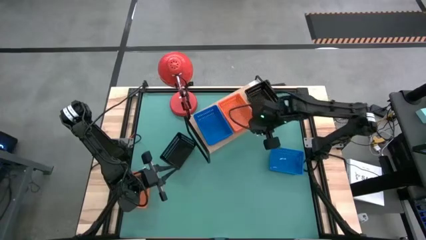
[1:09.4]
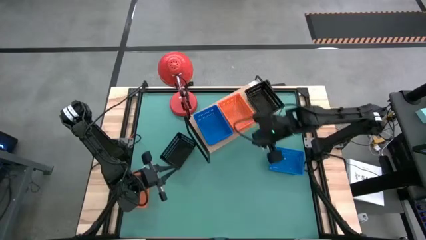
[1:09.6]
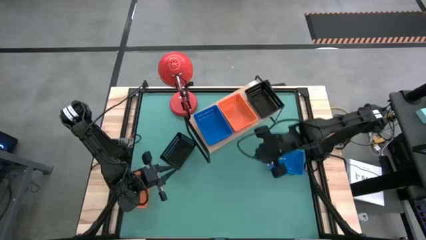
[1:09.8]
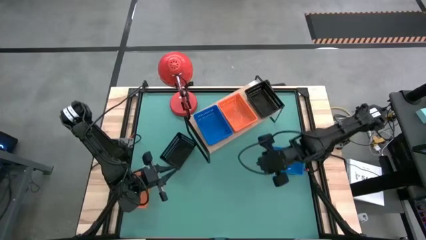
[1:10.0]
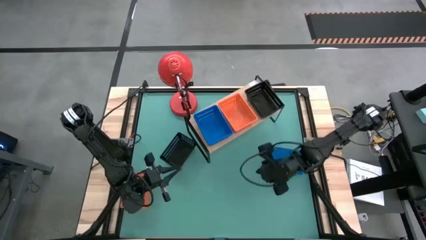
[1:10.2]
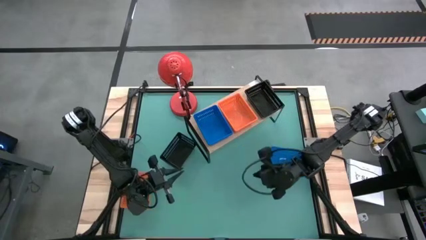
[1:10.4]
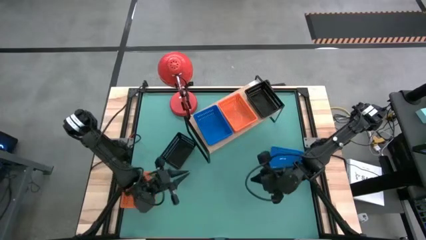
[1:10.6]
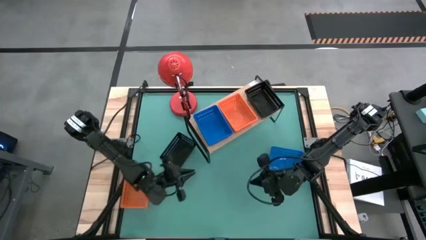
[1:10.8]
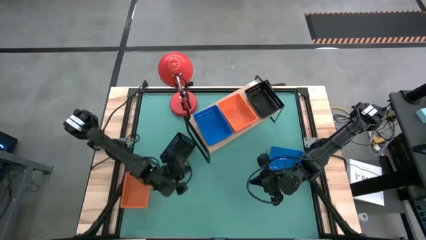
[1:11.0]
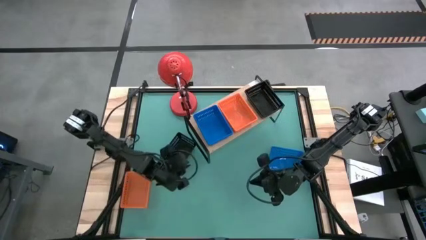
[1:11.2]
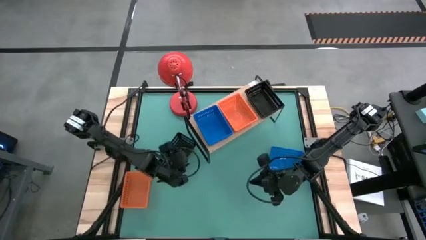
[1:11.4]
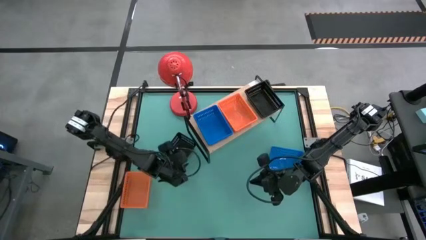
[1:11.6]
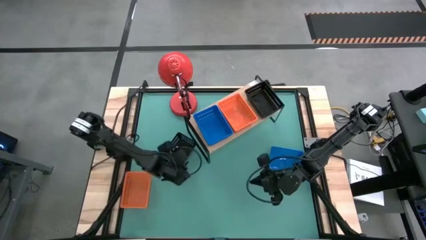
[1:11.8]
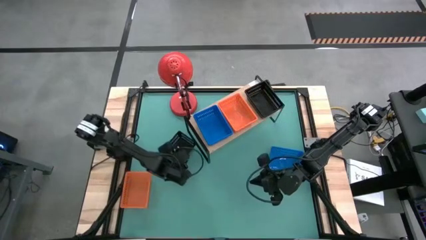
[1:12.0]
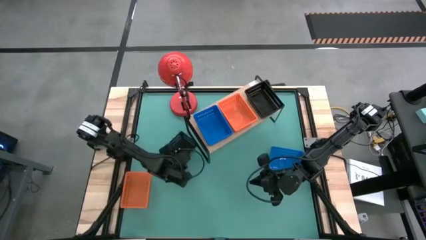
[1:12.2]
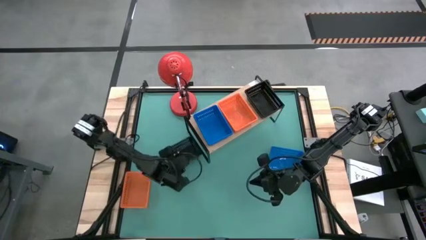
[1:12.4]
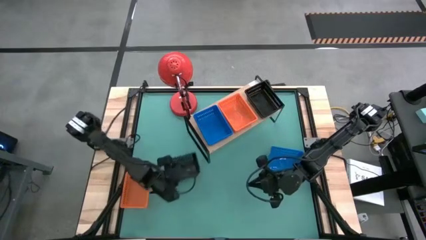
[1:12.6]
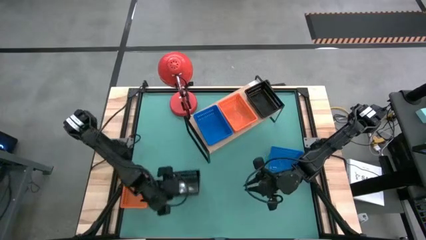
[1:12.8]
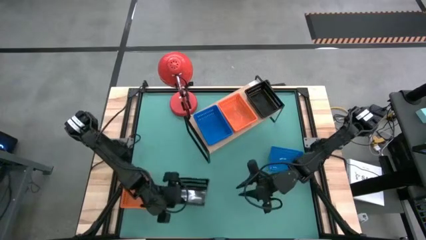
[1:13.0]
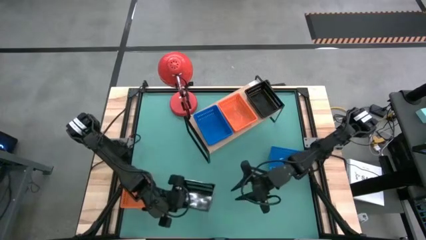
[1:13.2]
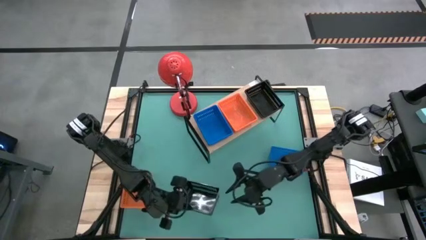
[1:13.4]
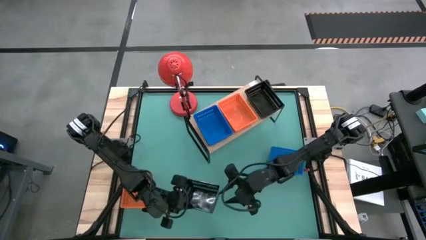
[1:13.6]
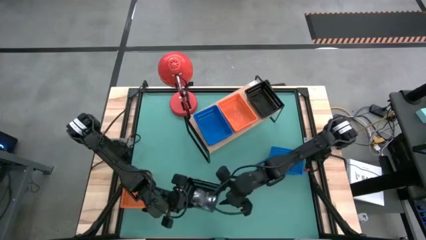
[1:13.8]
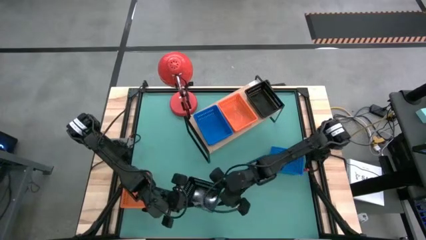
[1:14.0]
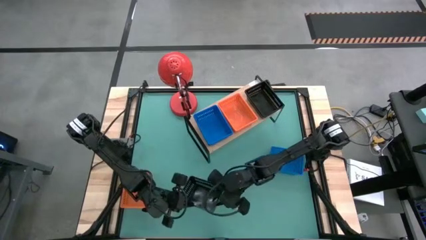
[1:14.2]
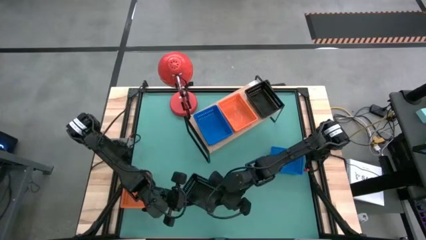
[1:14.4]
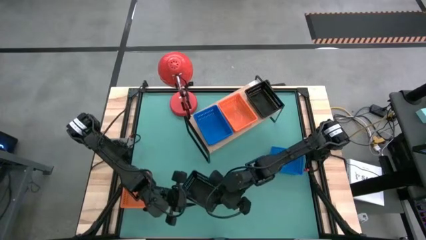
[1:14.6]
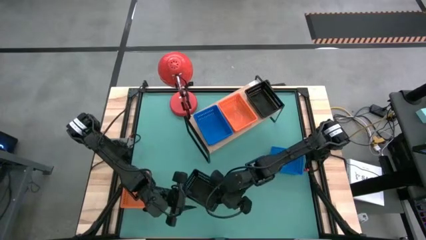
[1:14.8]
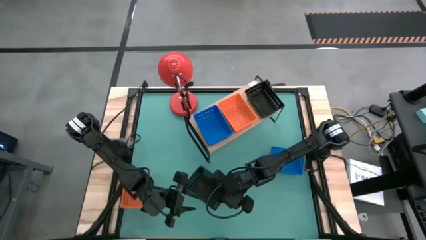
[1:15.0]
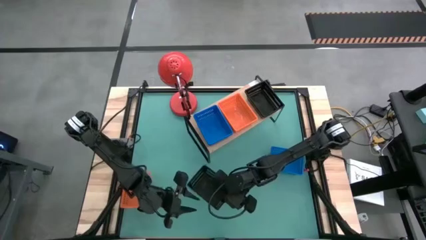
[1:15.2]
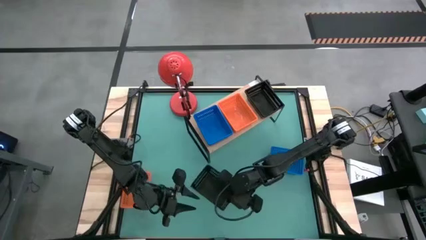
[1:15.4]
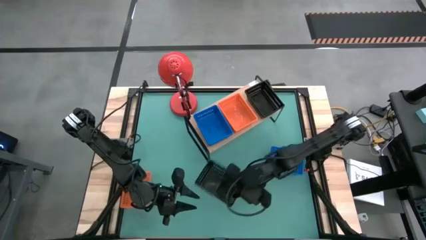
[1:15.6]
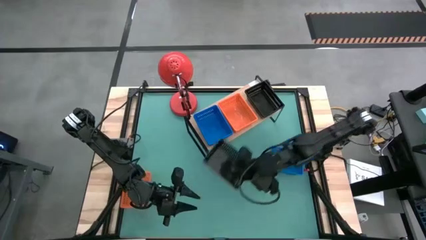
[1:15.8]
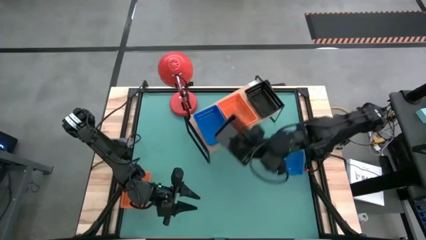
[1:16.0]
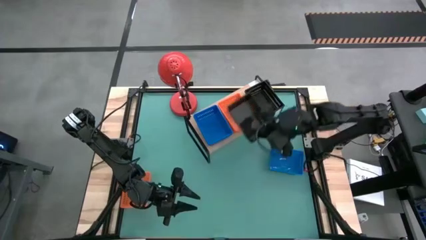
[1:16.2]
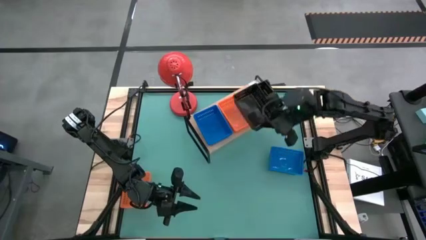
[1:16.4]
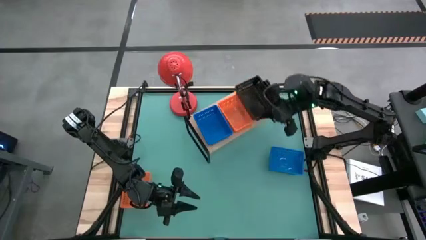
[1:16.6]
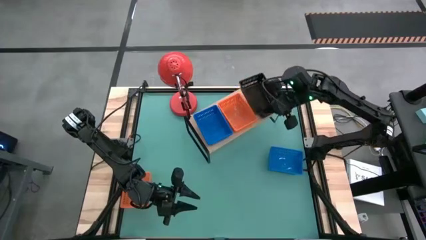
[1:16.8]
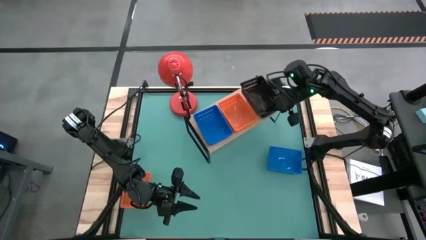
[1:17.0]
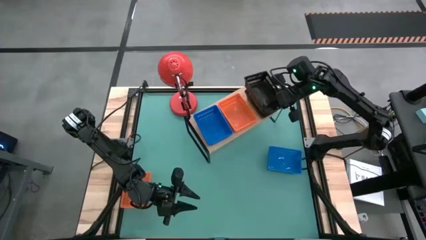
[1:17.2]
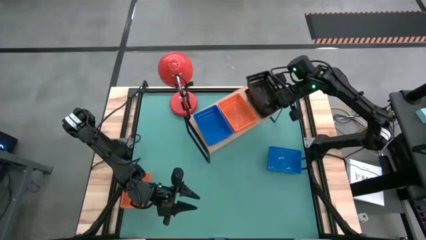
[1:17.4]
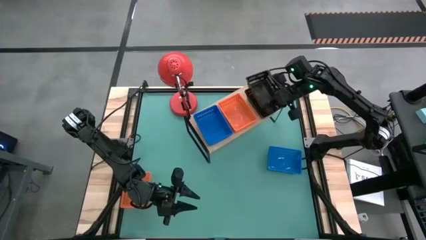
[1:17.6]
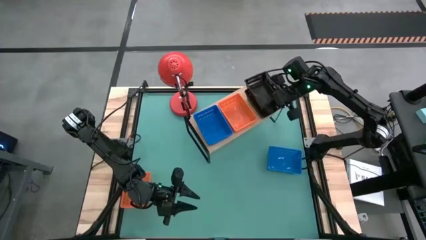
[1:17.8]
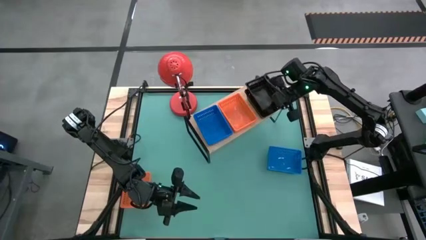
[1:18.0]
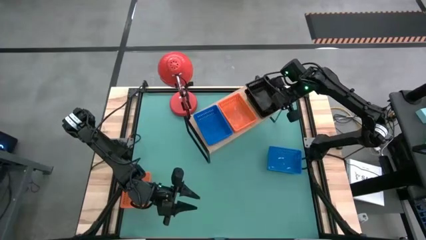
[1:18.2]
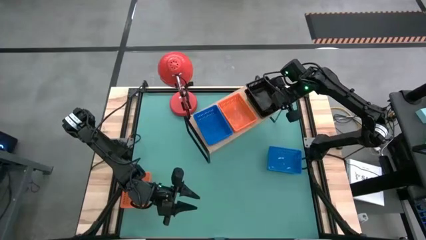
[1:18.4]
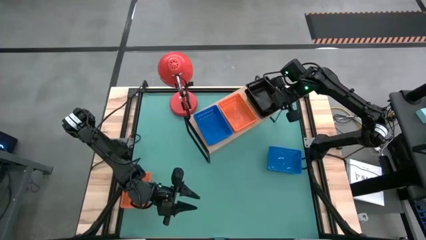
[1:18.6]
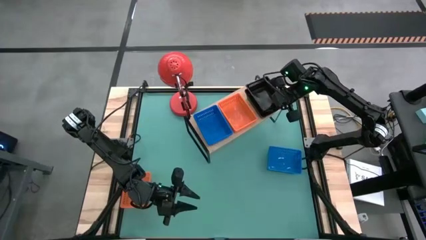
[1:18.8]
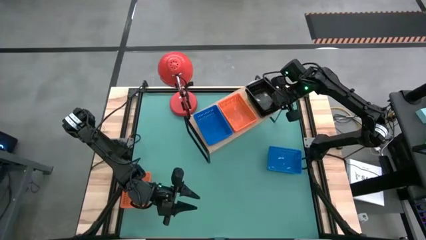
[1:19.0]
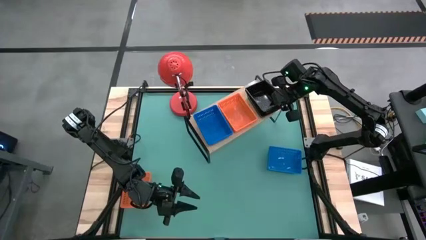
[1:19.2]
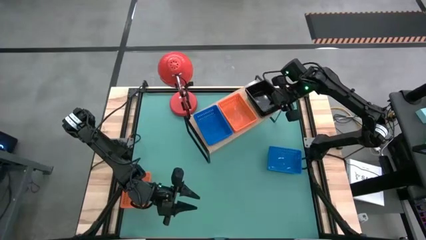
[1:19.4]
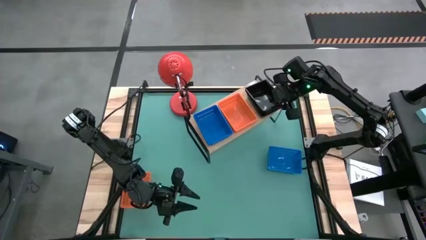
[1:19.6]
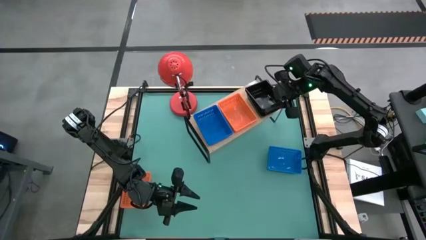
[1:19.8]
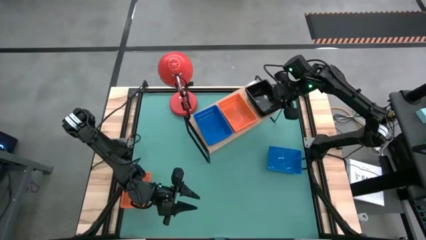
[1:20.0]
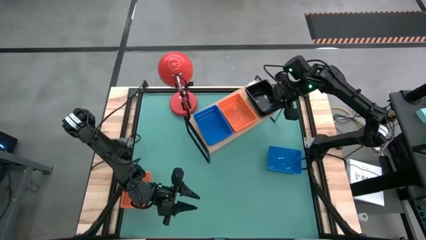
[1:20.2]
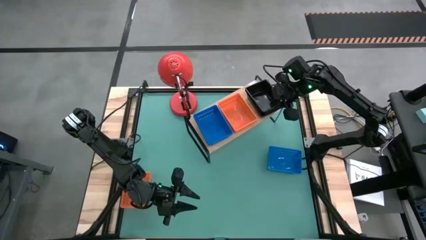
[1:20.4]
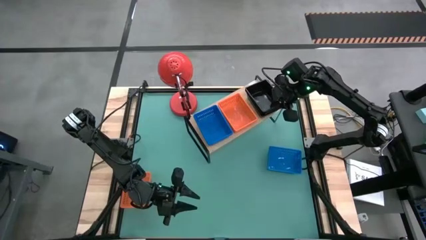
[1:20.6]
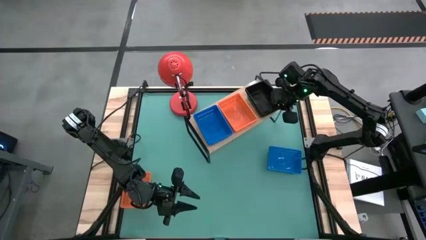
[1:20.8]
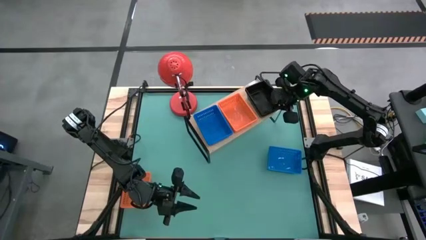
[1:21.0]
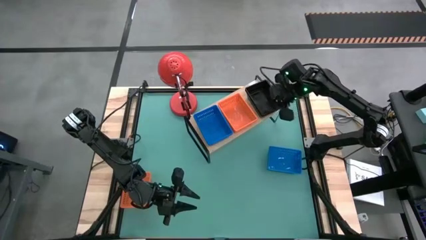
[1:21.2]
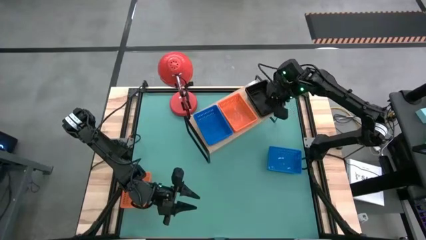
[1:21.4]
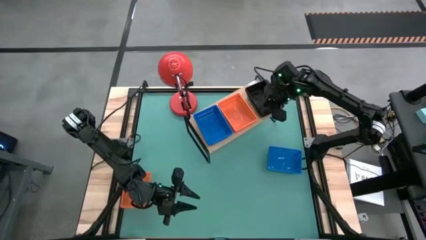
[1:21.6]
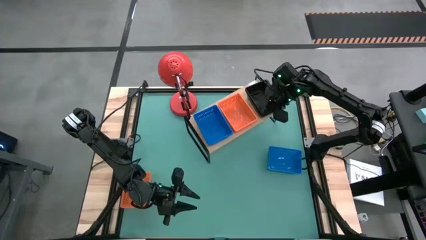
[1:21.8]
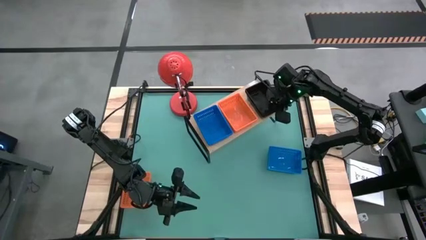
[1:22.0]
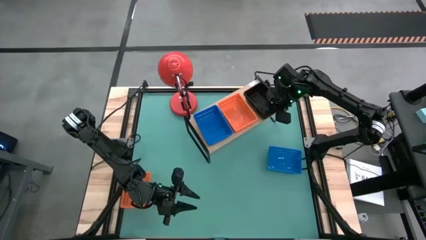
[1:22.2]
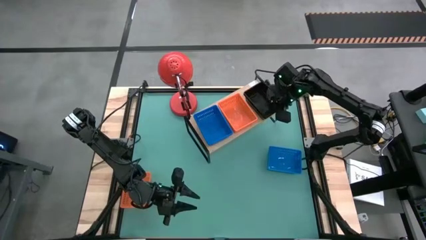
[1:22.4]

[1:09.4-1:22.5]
Task: Stack baskets on shelf by color
Stack the black basket on top of the black baskets on the shelf

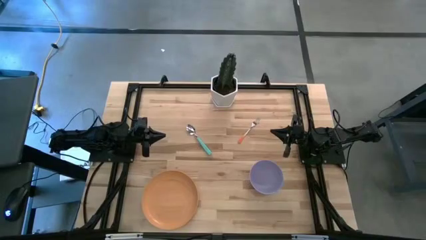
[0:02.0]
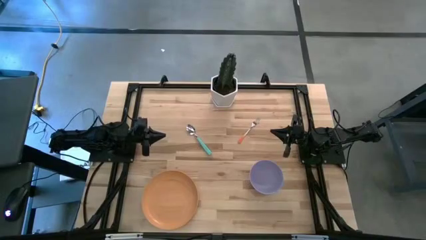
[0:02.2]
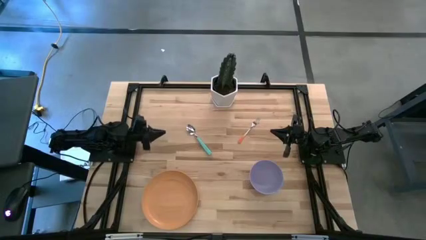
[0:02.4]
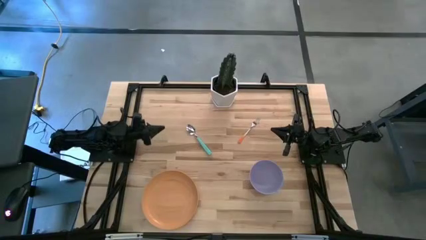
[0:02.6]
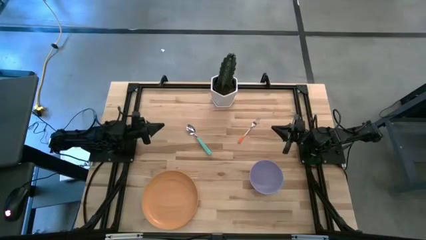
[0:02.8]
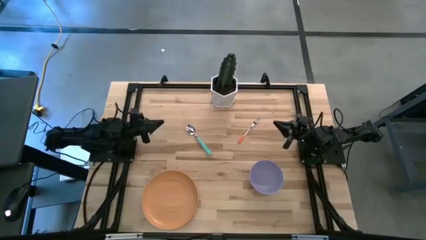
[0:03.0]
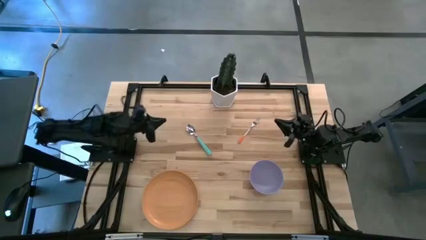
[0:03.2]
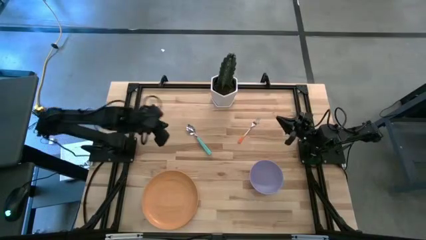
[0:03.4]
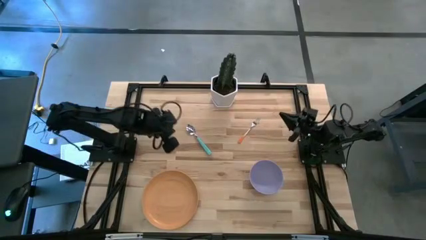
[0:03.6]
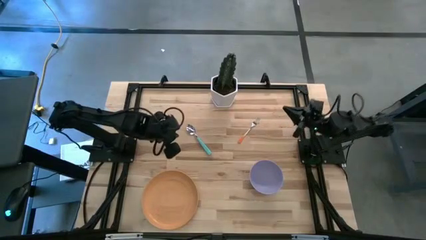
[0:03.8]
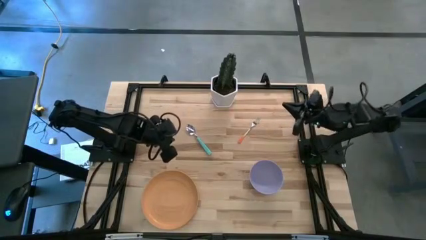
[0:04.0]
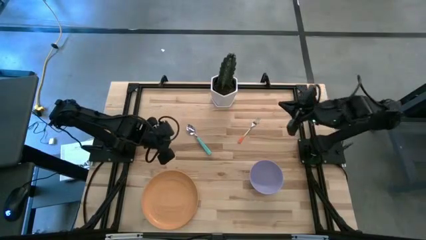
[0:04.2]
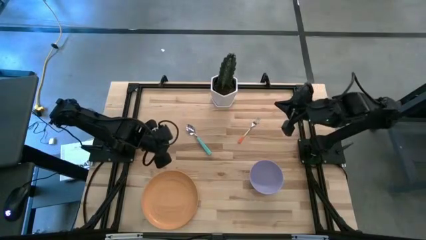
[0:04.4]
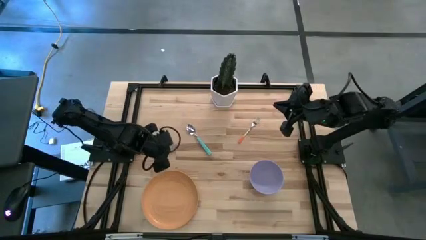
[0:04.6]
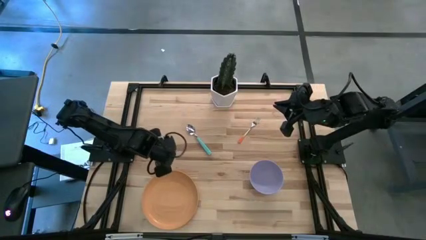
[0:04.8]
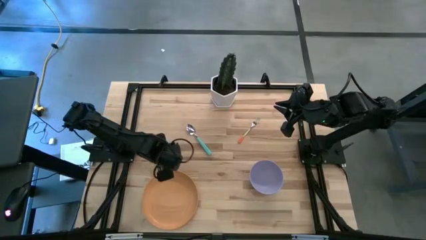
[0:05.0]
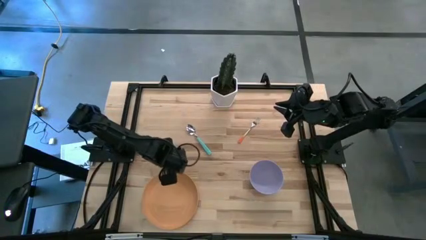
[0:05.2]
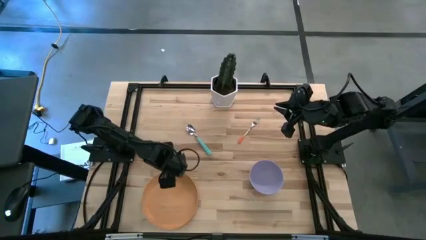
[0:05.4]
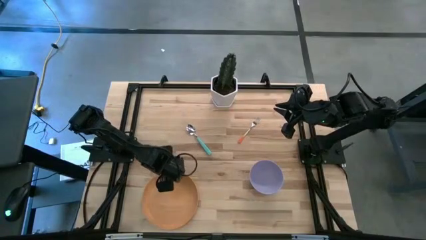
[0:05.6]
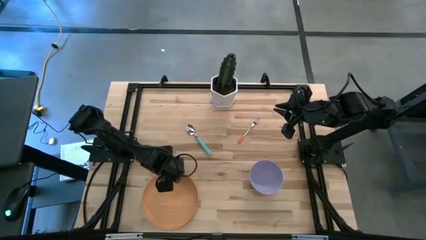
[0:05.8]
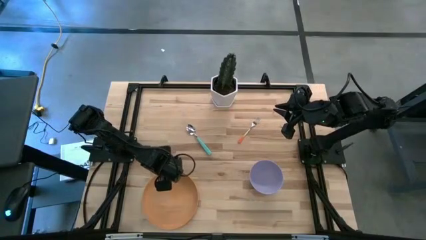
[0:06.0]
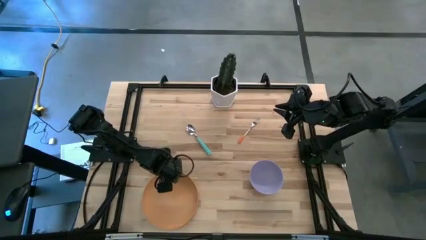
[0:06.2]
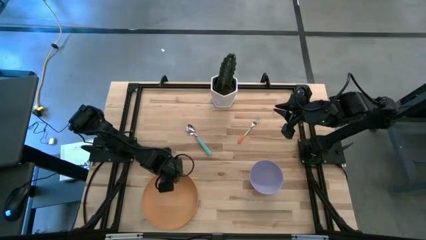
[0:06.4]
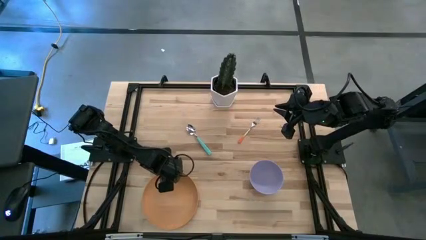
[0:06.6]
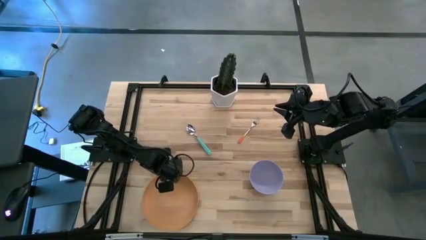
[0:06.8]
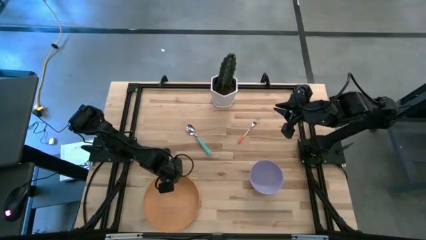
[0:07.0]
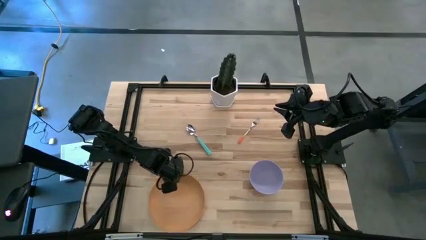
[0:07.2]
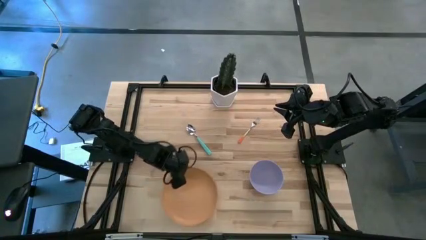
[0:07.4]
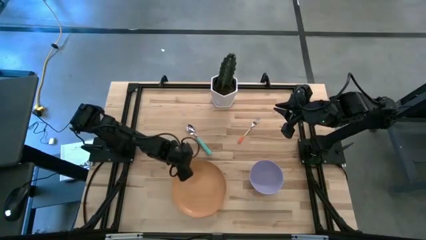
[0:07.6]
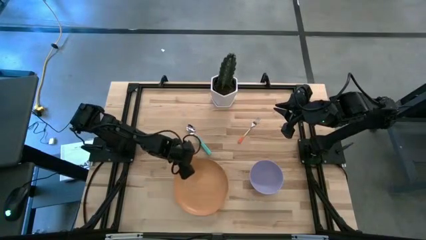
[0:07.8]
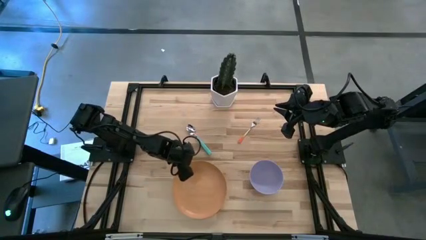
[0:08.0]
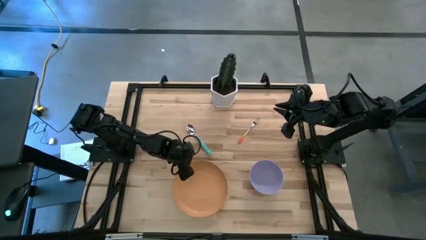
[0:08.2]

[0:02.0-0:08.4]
Task: Set table place
Move the orange plate to the center
